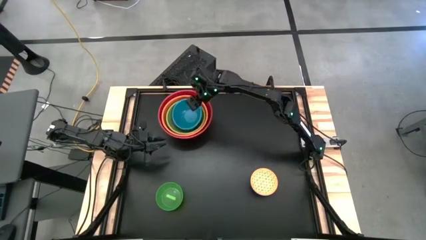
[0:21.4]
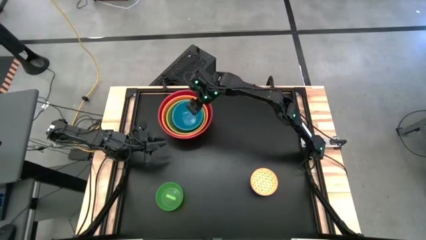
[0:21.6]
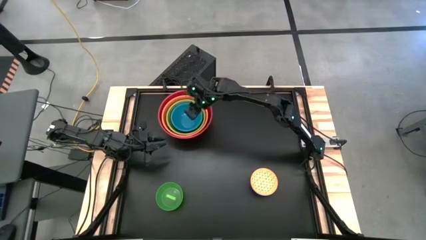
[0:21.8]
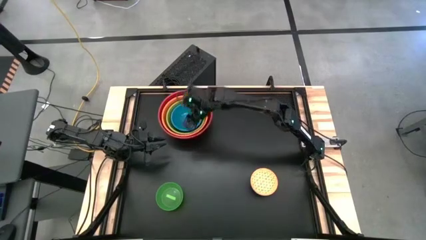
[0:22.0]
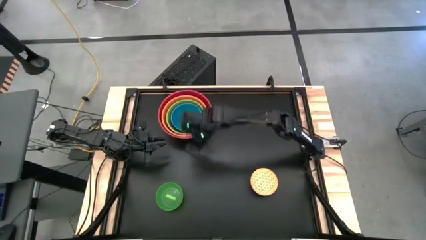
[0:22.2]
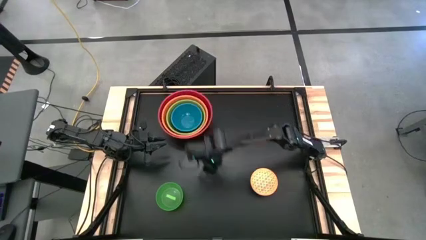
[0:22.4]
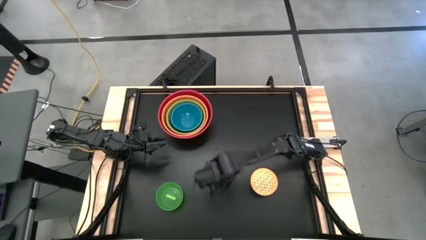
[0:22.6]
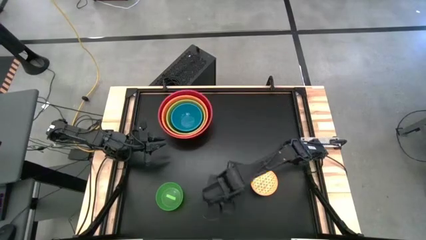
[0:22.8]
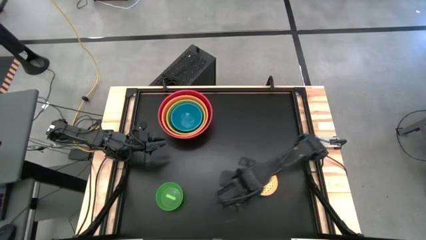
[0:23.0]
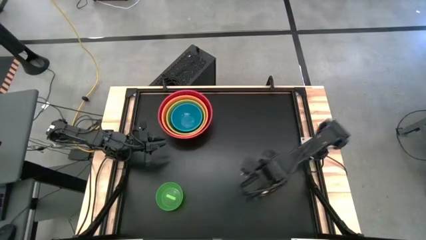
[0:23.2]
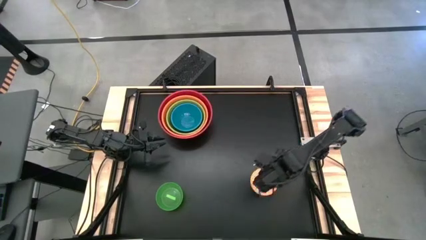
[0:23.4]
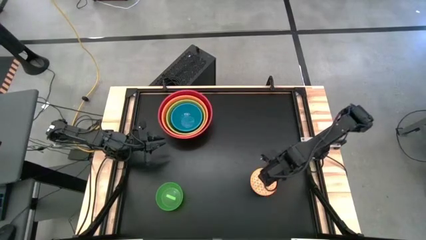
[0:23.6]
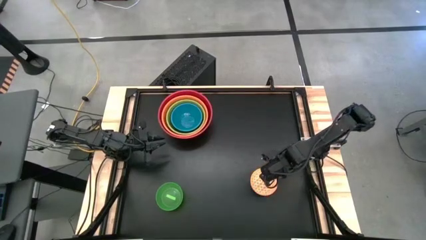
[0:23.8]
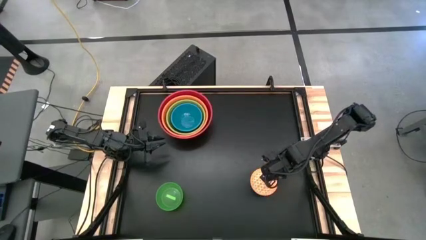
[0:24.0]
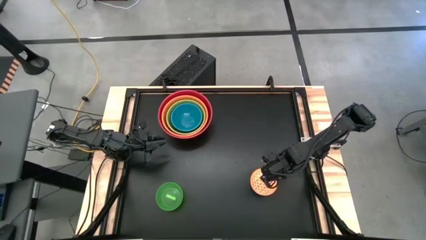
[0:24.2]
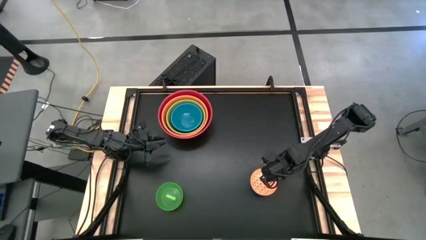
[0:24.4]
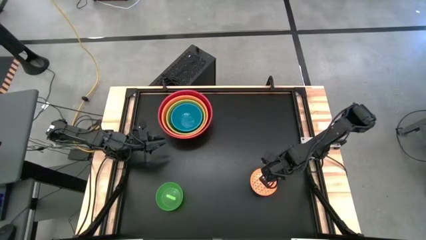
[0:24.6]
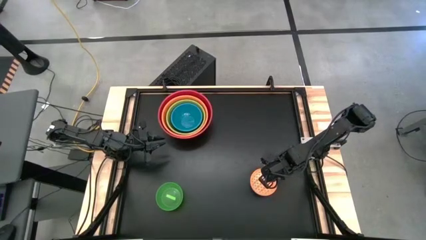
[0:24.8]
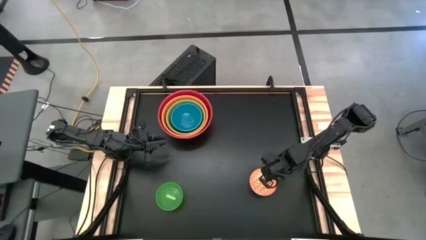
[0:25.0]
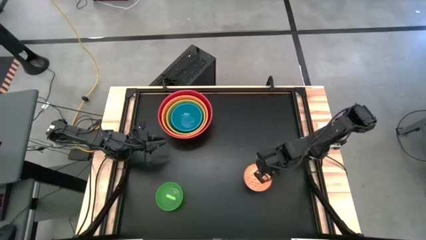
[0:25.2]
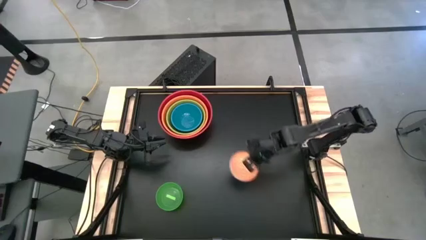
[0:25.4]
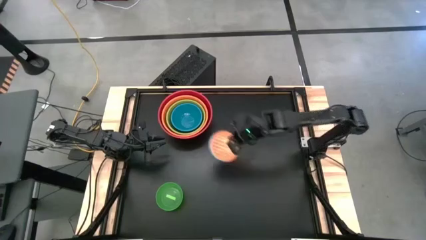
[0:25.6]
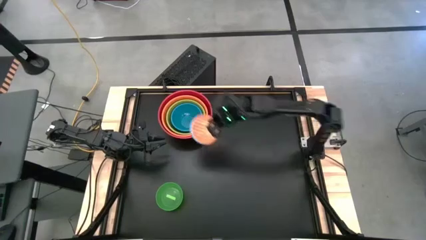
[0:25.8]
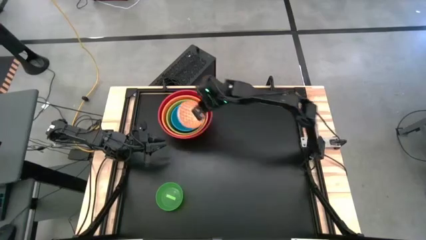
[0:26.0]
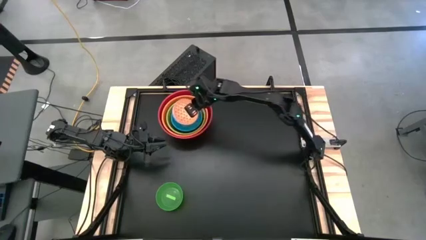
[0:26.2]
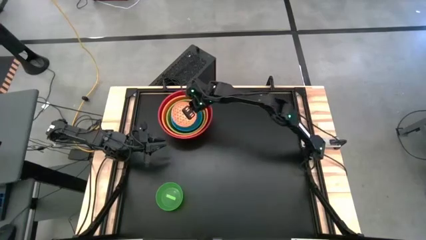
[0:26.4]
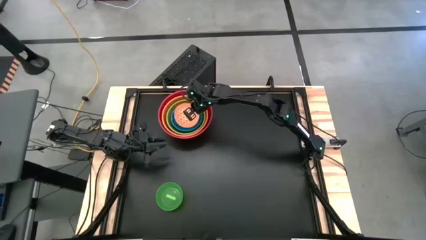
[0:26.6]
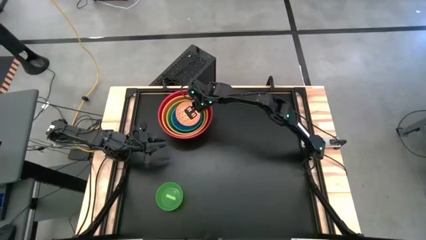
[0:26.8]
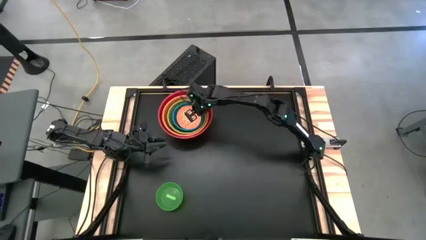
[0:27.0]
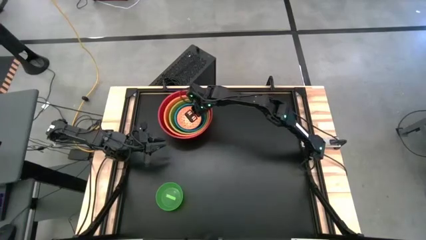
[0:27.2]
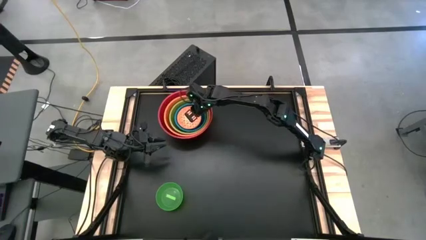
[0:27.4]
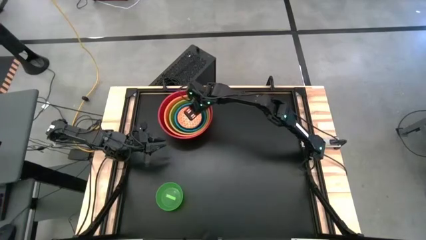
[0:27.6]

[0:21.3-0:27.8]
Stack the orange patterned bowl on top of the blue bowl

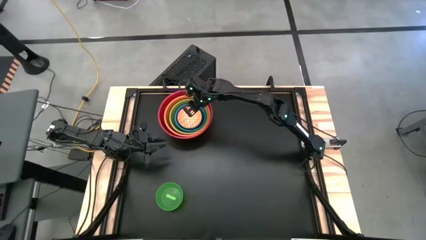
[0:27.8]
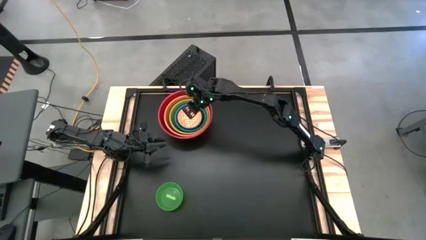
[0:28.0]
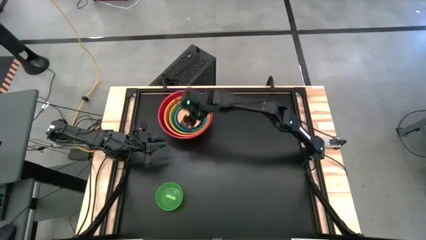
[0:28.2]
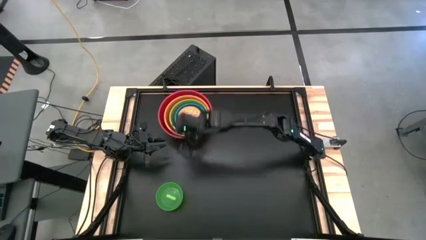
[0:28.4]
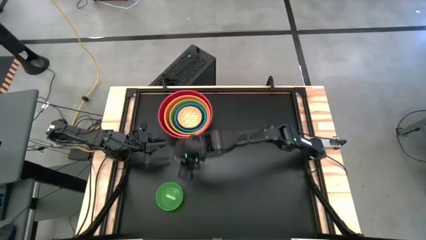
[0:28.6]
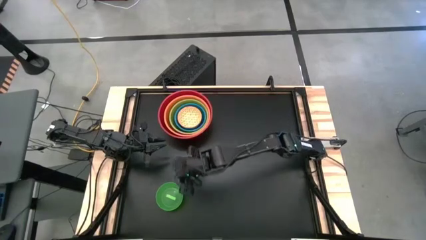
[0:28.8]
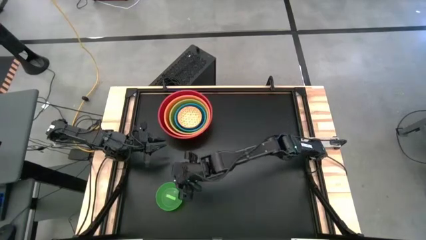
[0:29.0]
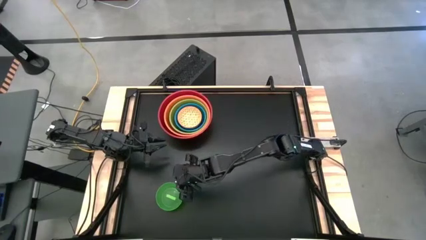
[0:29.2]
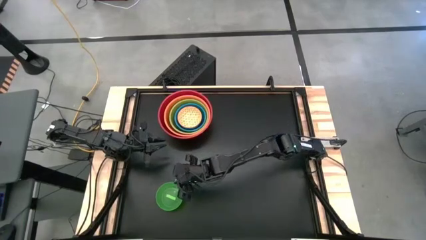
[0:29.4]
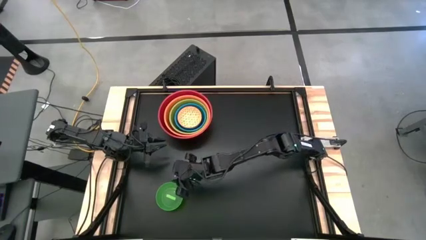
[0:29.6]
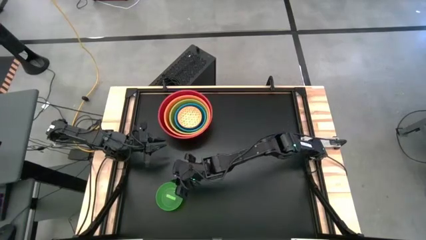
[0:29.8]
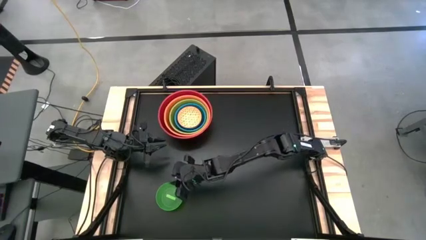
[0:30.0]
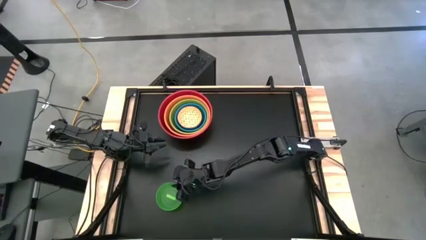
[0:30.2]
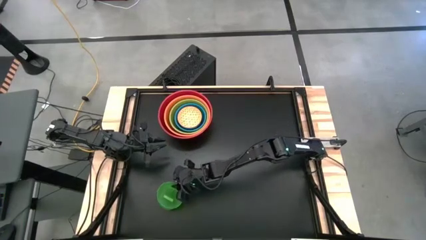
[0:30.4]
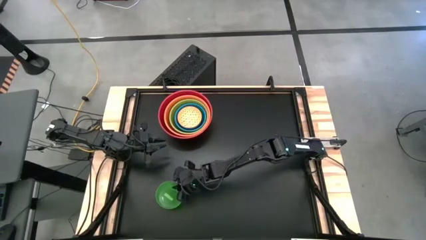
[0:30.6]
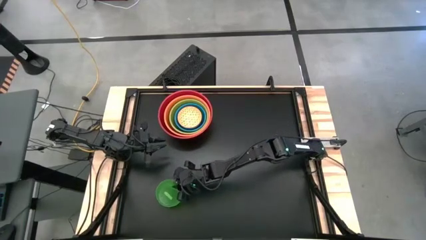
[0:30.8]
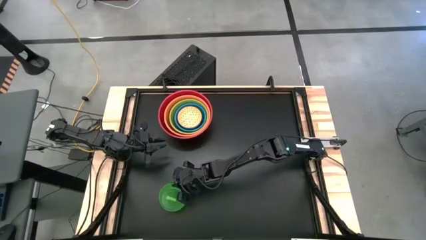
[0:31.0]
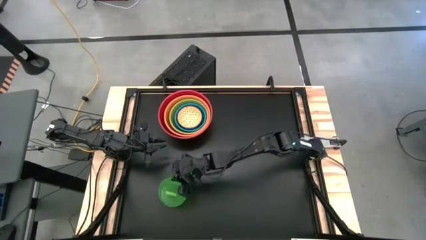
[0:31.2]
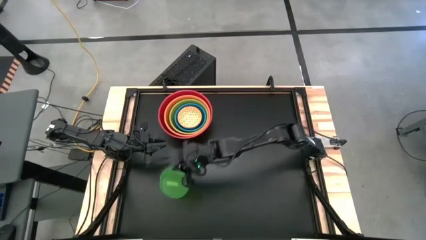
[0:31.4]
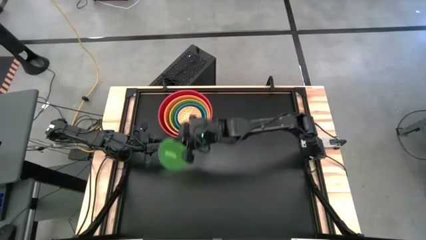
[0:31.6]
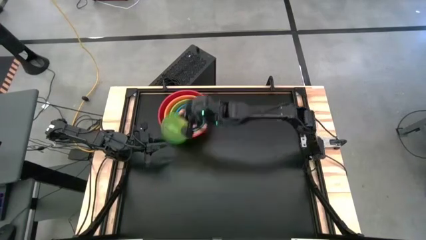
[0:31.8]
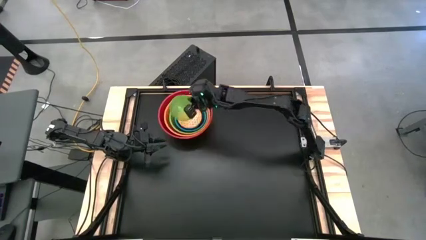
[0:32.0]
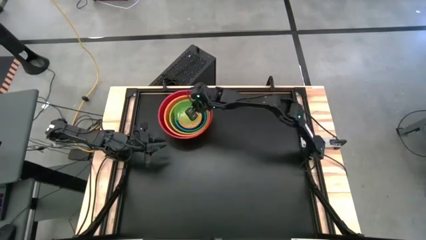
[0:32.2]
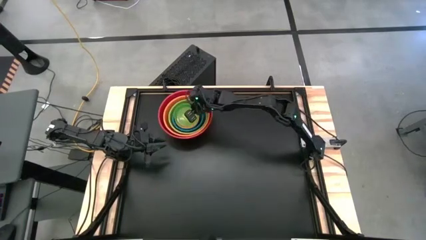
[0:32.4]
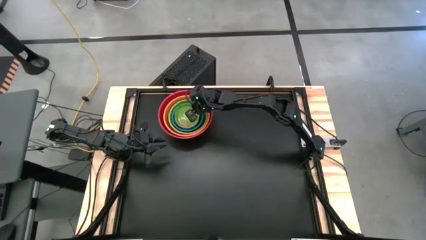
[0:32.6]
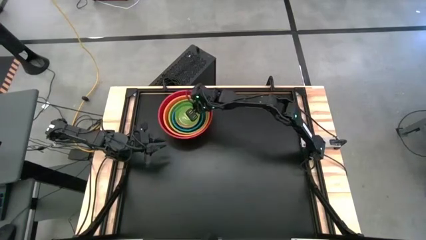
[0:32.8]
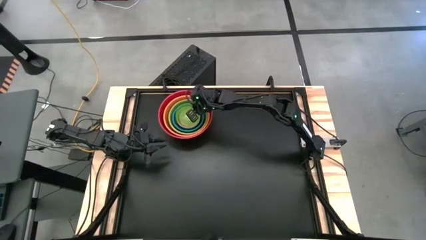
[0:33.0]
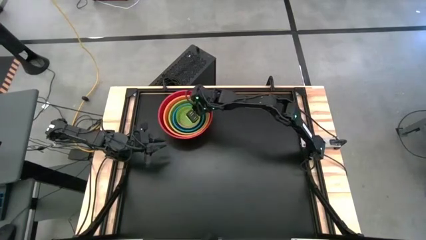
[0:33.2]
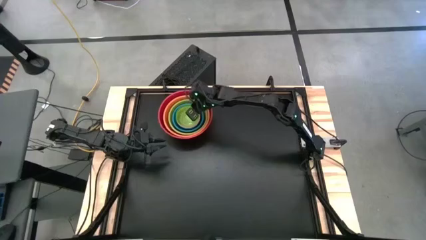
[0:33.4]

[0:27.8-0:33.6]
Stack the green bowl on top of the orange patterned bowl

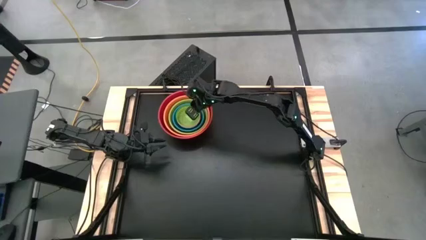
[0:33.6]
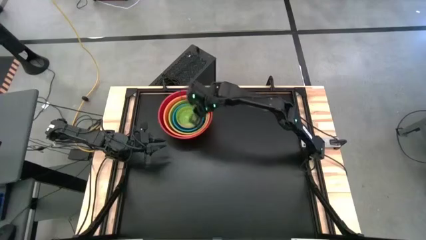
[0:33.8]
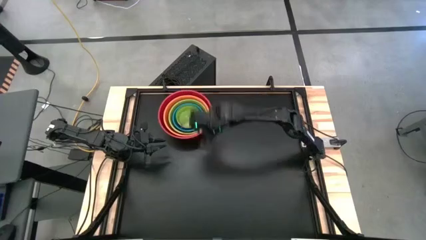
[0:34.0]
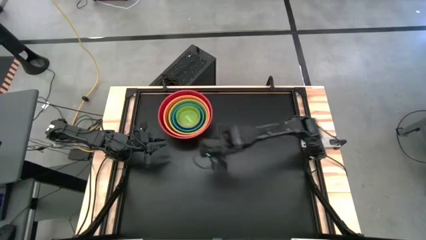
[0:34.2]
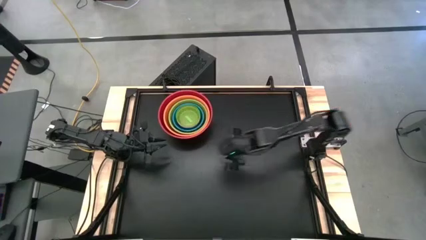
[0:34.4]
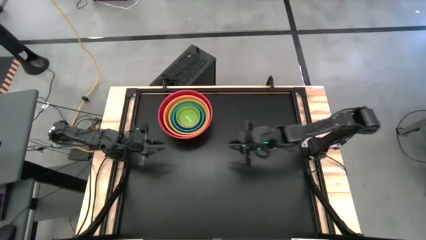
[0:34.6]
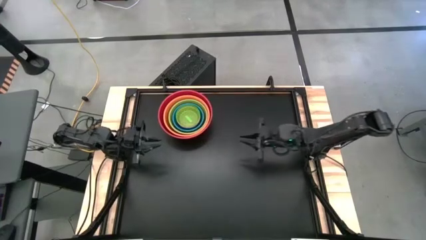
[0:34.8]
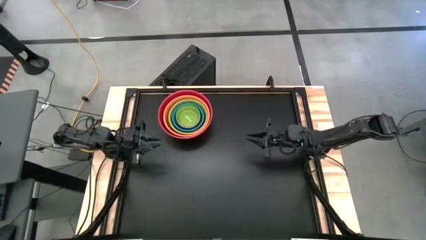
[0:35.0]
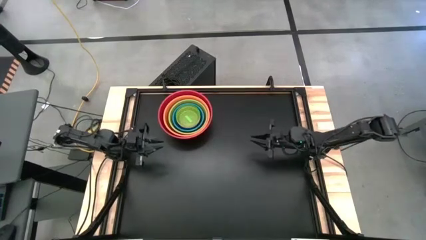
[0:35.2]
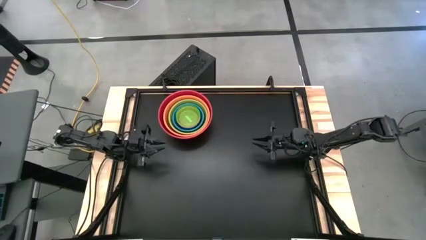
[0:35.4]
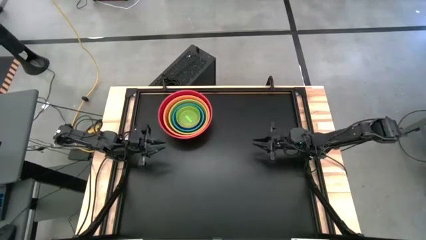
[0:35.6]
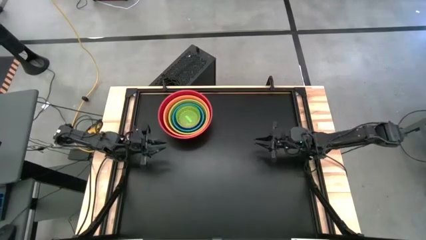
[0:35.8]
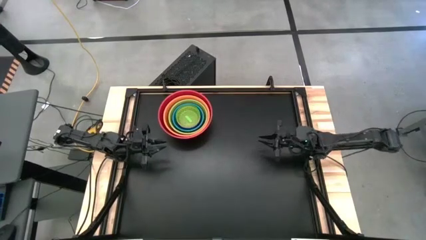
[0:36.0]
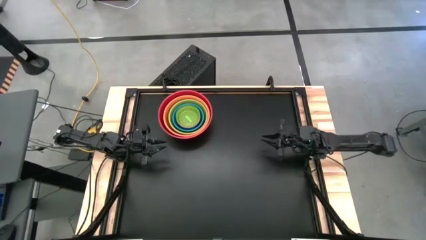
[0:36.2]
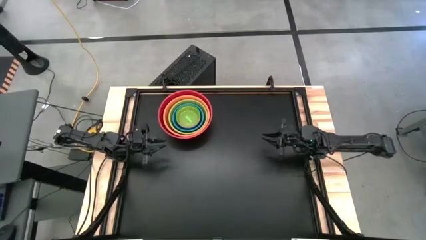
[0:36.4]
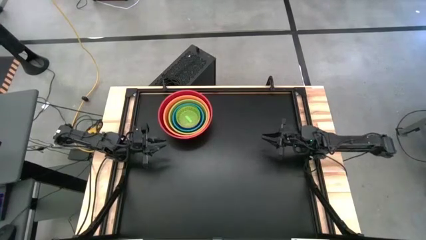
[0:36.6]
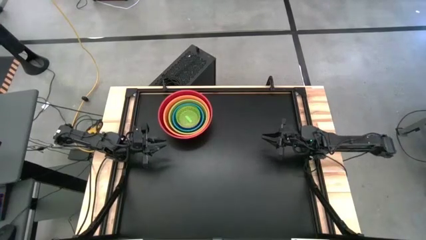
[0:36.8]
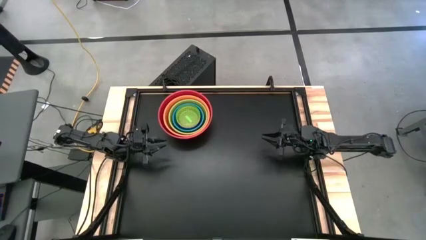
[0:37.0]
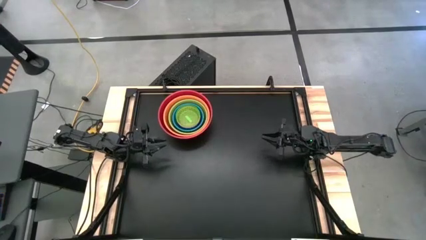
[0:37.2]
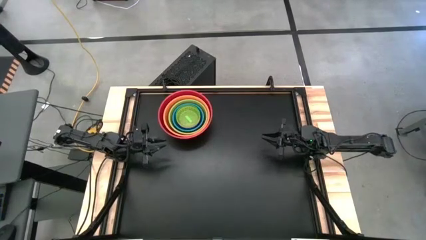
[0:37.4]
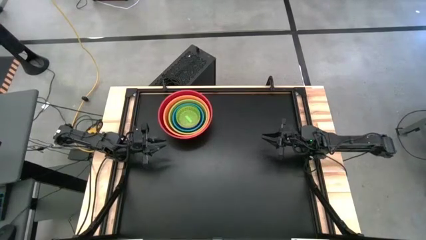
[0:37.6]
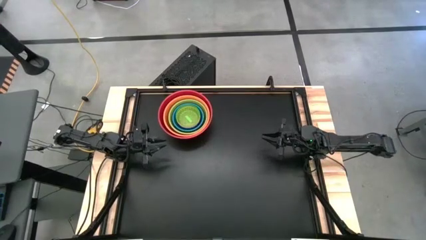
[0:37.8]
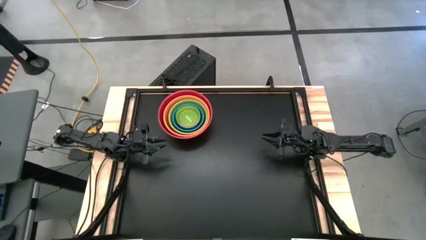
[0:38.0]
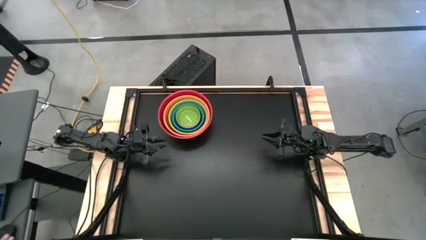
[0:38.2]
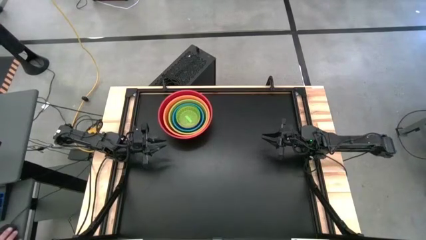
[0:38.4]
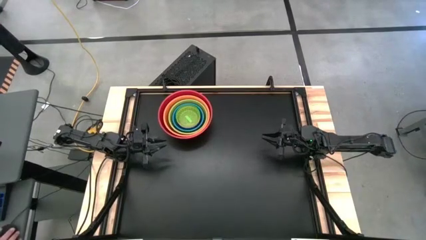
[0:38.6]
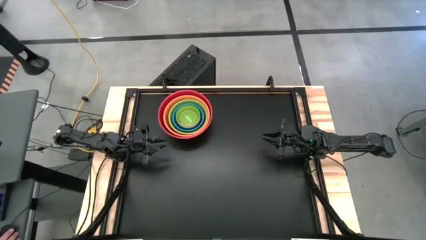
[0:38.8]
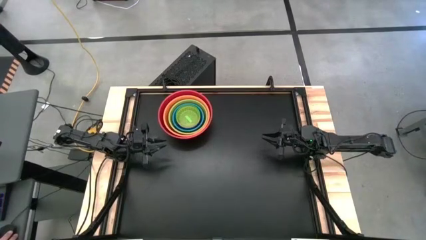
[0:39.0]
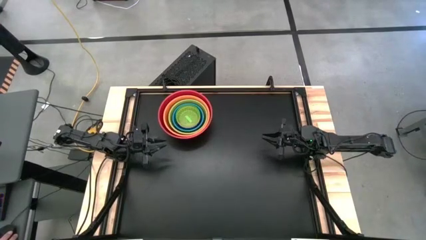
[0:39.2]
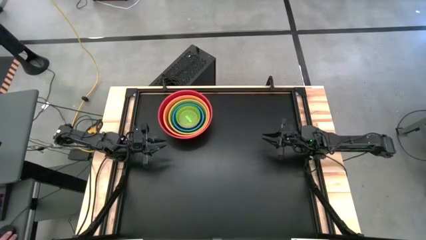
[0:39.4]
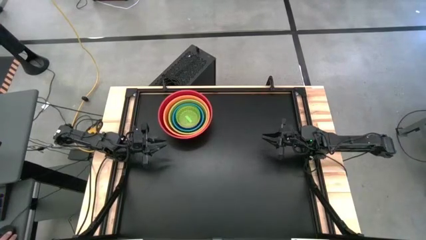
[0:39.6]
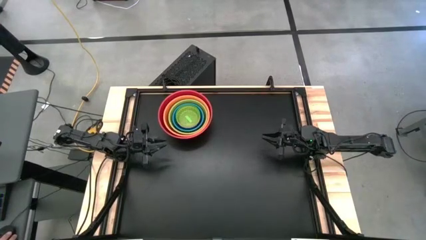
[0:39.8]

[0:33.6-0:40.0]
Return to Home Position
